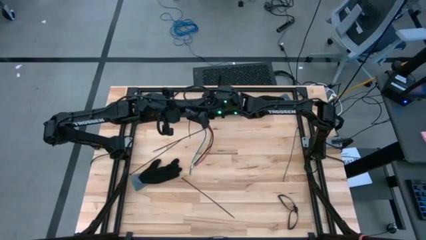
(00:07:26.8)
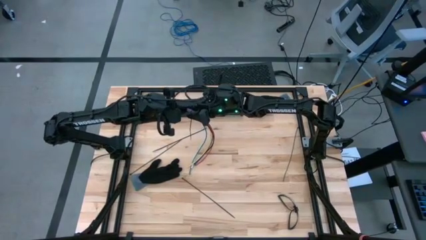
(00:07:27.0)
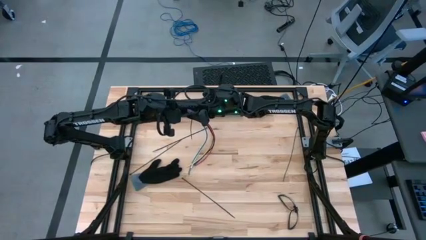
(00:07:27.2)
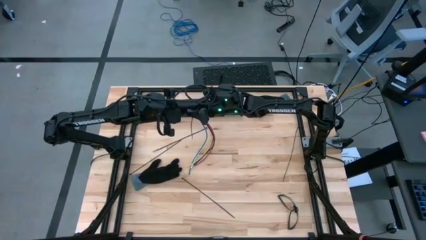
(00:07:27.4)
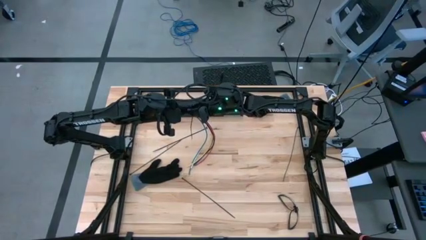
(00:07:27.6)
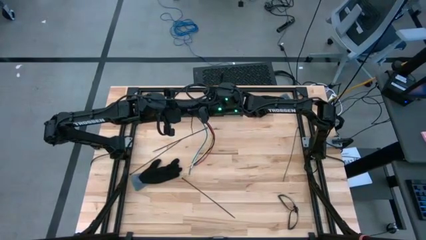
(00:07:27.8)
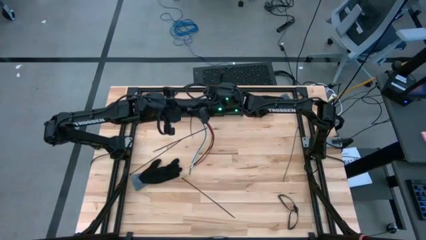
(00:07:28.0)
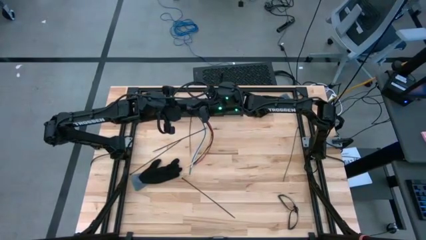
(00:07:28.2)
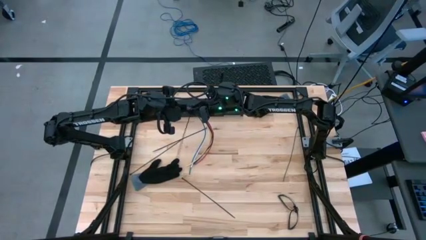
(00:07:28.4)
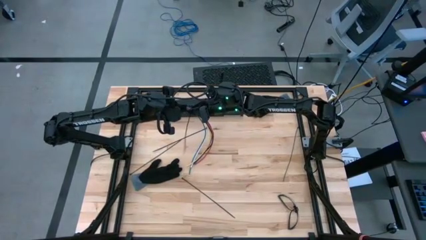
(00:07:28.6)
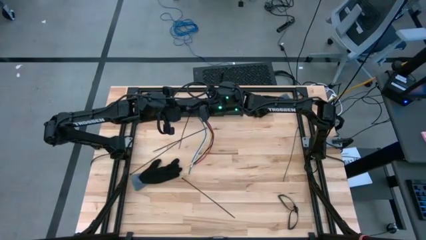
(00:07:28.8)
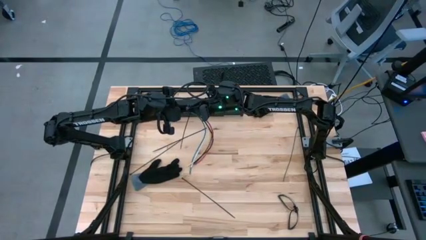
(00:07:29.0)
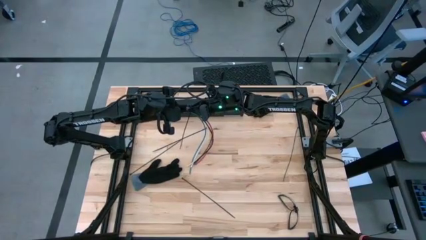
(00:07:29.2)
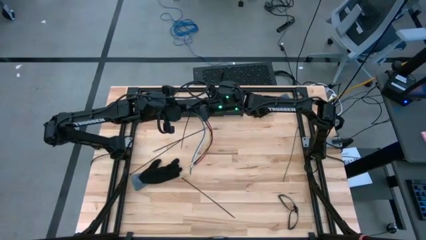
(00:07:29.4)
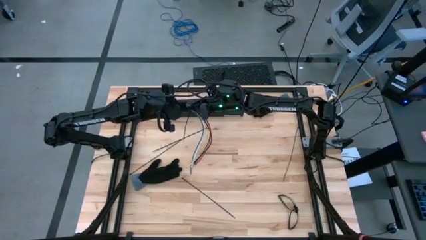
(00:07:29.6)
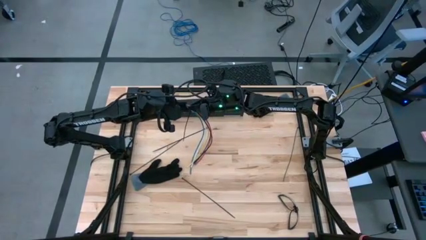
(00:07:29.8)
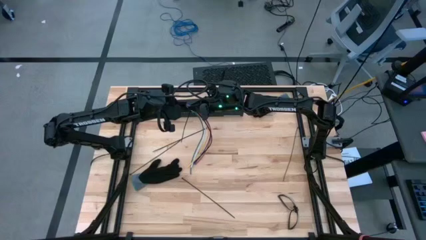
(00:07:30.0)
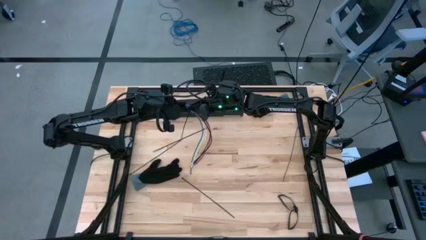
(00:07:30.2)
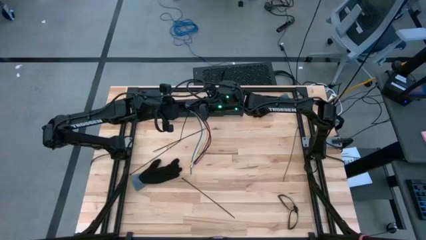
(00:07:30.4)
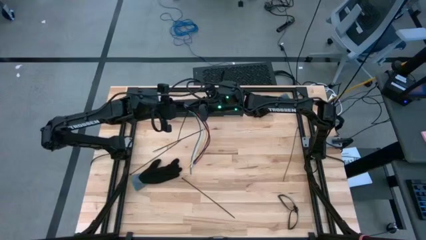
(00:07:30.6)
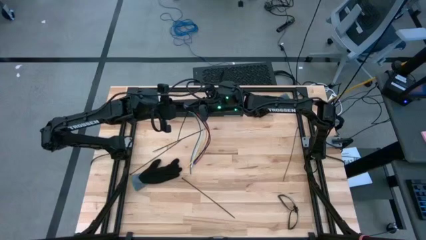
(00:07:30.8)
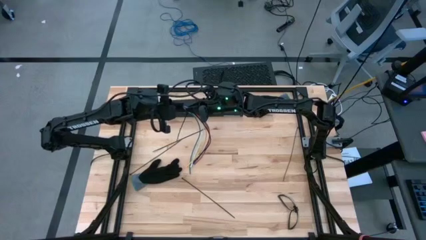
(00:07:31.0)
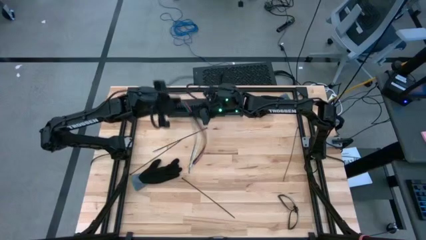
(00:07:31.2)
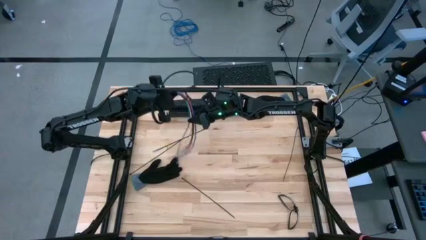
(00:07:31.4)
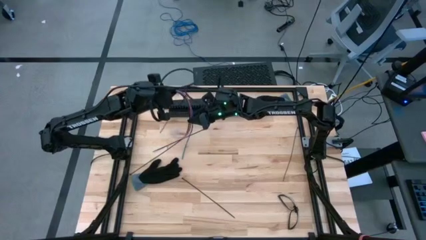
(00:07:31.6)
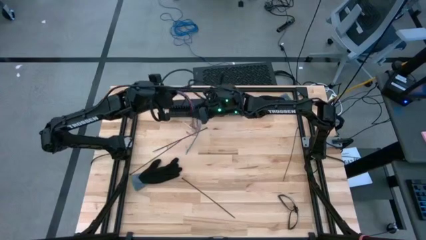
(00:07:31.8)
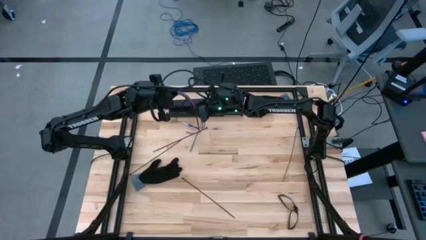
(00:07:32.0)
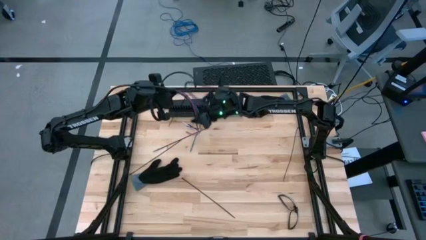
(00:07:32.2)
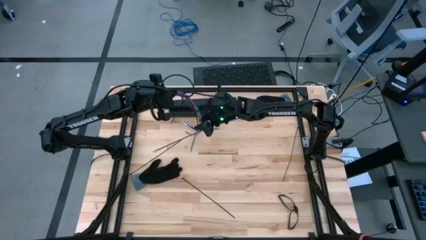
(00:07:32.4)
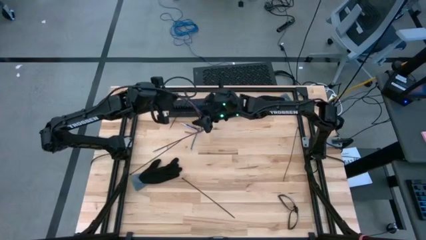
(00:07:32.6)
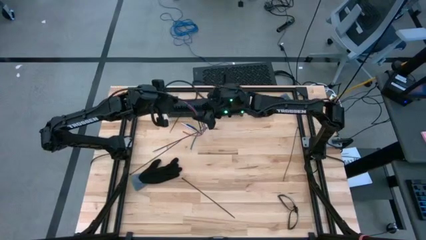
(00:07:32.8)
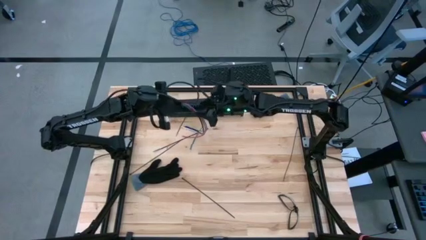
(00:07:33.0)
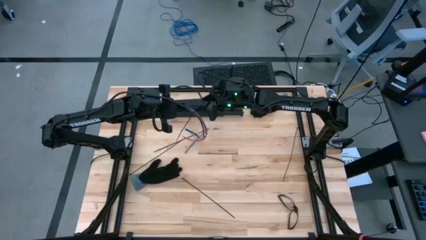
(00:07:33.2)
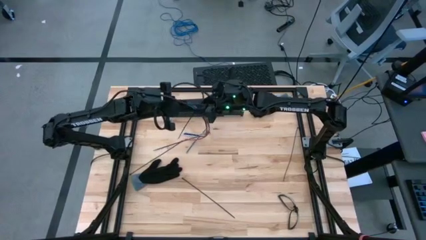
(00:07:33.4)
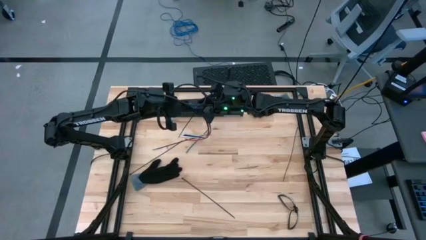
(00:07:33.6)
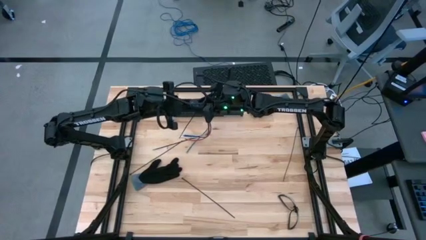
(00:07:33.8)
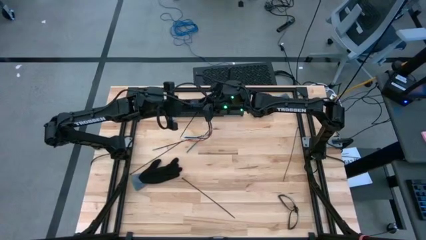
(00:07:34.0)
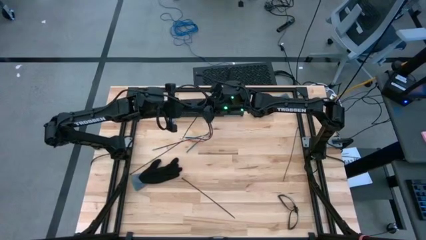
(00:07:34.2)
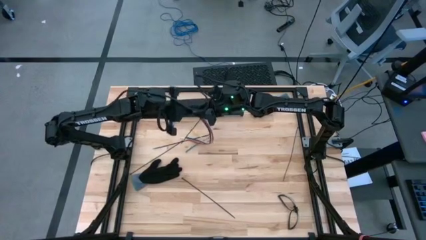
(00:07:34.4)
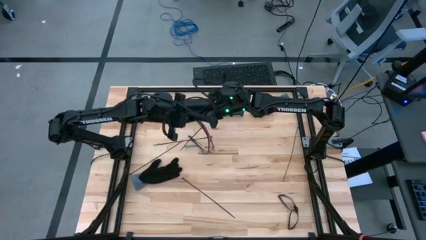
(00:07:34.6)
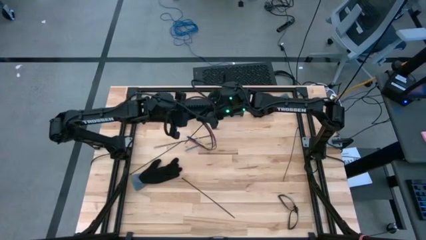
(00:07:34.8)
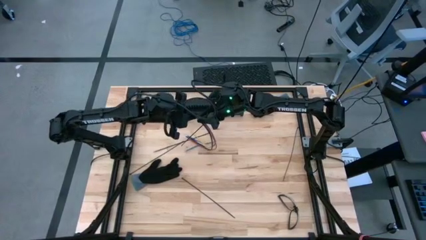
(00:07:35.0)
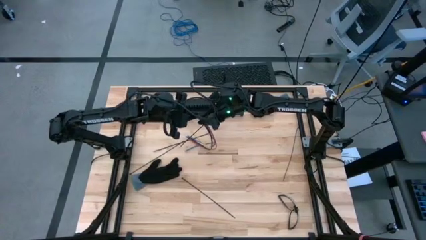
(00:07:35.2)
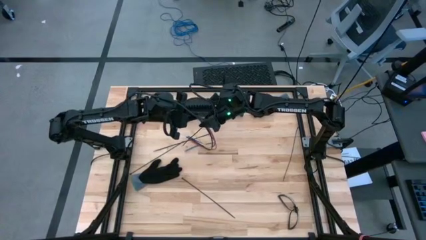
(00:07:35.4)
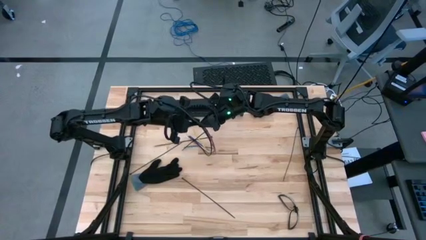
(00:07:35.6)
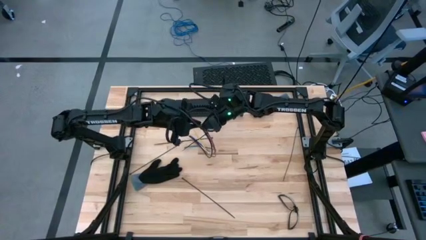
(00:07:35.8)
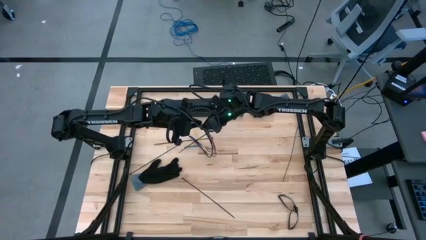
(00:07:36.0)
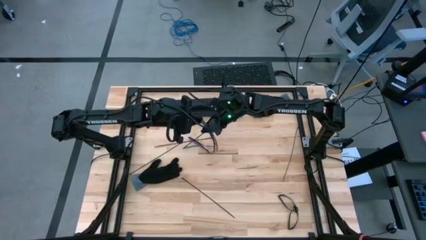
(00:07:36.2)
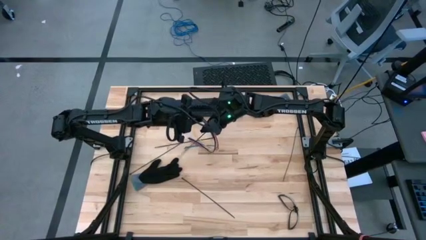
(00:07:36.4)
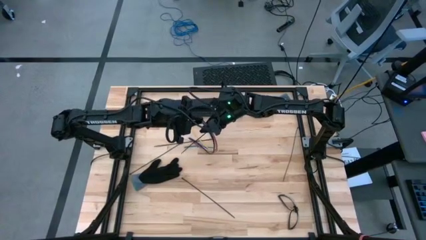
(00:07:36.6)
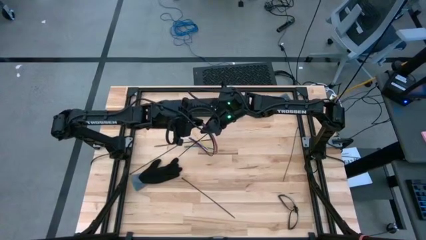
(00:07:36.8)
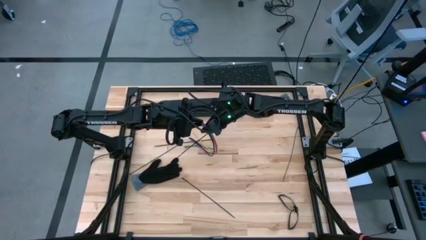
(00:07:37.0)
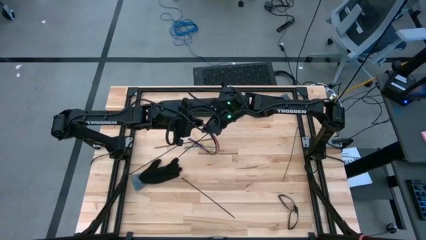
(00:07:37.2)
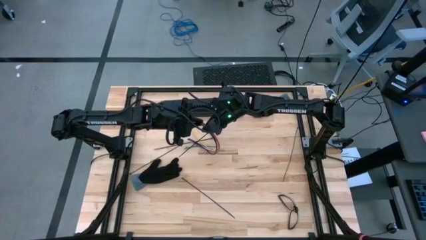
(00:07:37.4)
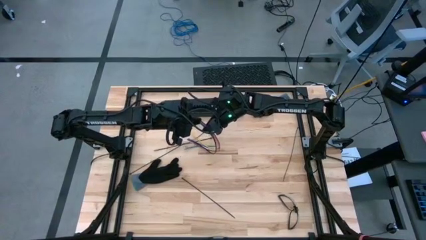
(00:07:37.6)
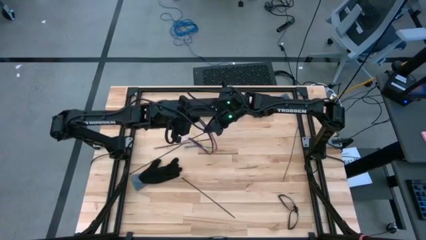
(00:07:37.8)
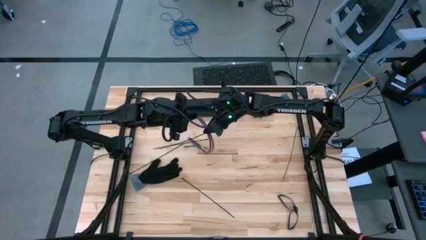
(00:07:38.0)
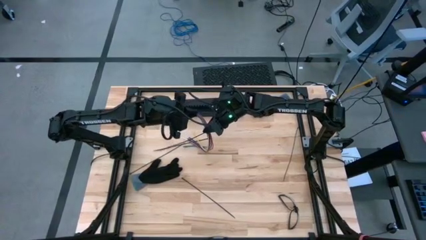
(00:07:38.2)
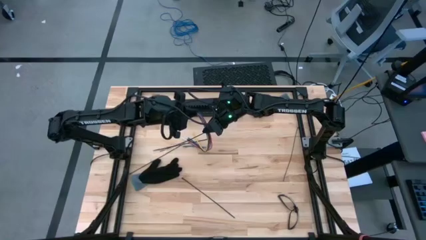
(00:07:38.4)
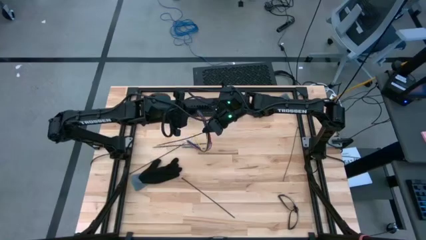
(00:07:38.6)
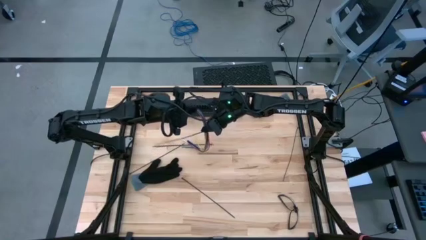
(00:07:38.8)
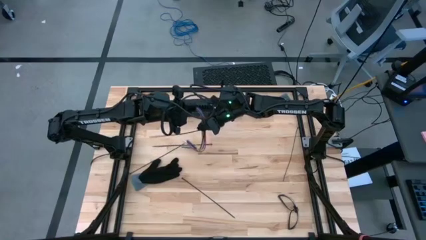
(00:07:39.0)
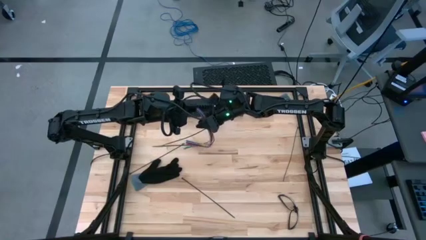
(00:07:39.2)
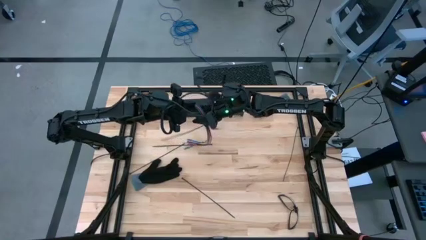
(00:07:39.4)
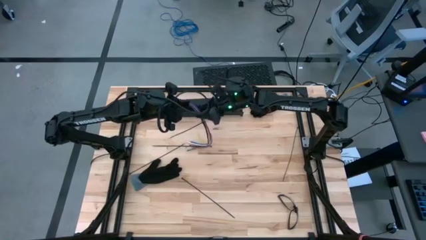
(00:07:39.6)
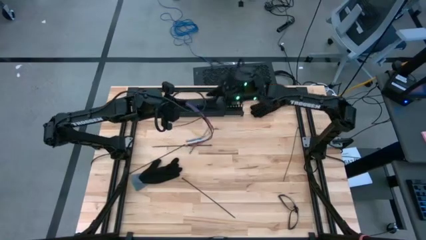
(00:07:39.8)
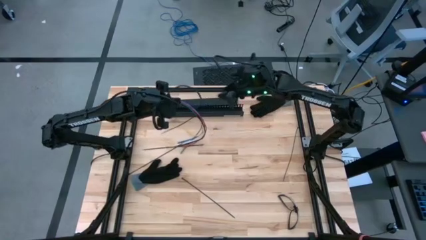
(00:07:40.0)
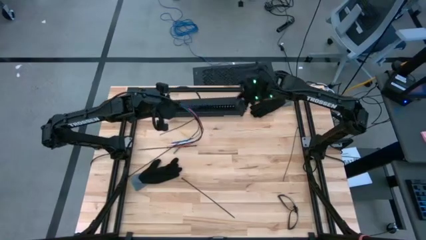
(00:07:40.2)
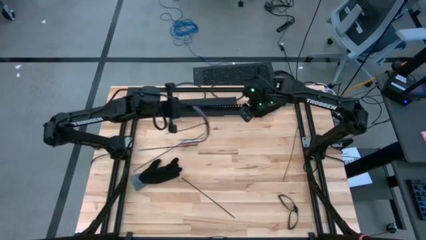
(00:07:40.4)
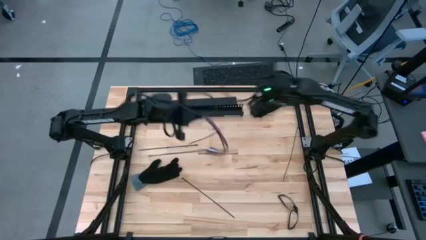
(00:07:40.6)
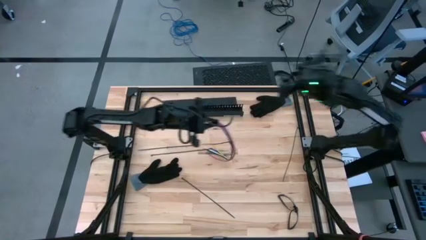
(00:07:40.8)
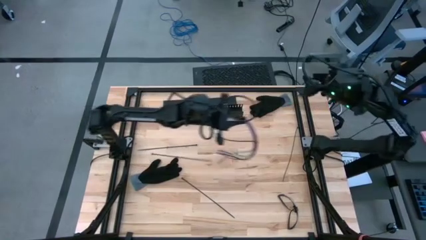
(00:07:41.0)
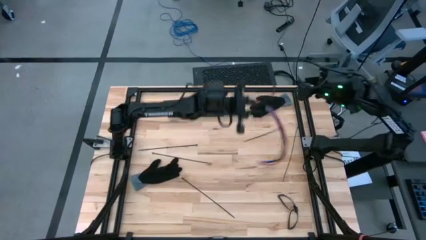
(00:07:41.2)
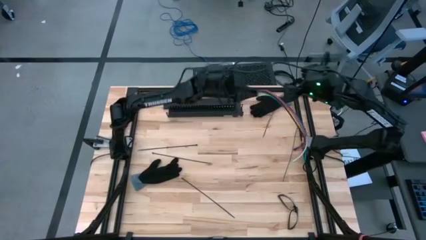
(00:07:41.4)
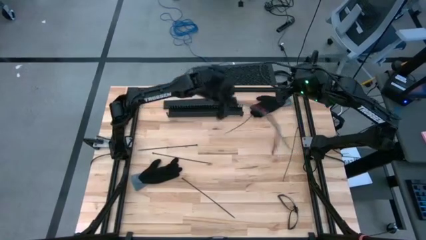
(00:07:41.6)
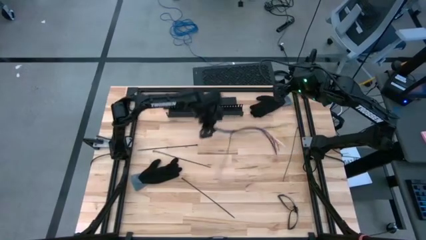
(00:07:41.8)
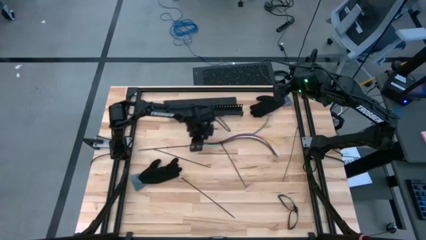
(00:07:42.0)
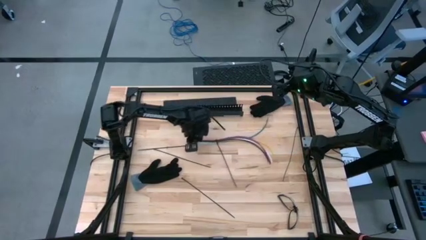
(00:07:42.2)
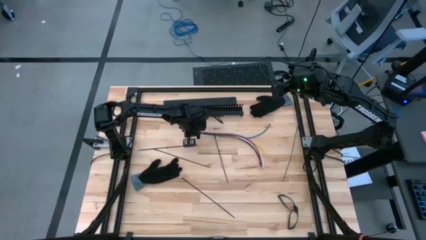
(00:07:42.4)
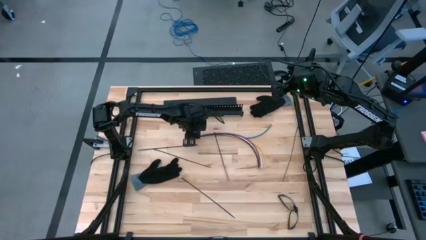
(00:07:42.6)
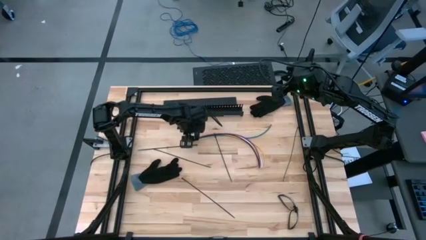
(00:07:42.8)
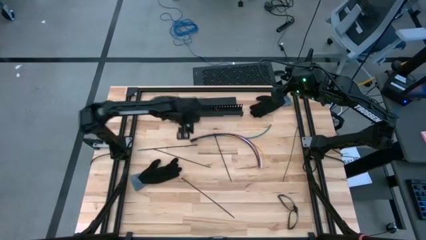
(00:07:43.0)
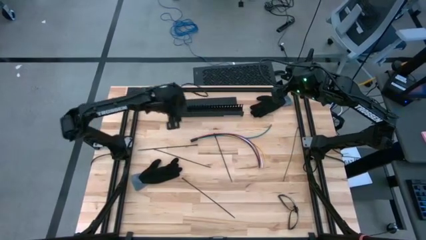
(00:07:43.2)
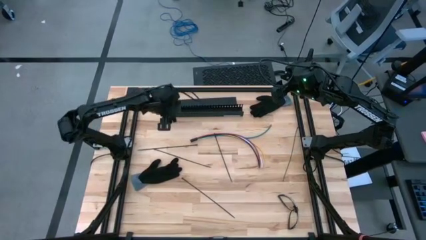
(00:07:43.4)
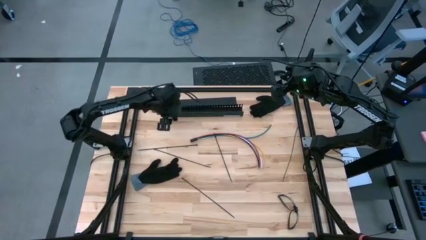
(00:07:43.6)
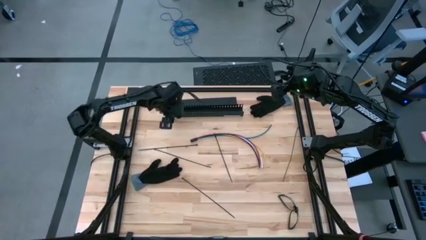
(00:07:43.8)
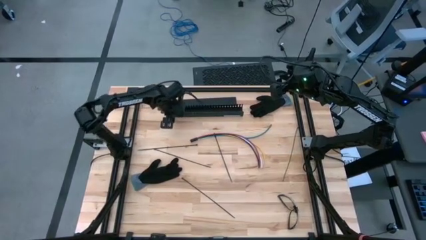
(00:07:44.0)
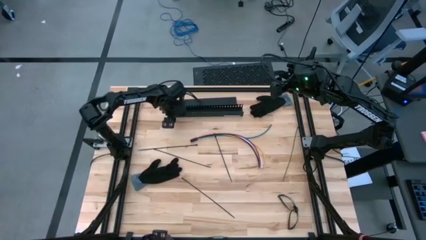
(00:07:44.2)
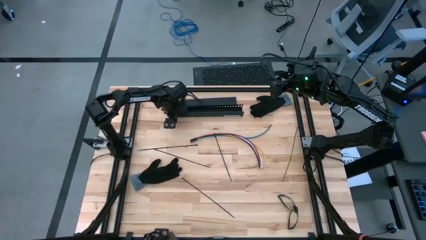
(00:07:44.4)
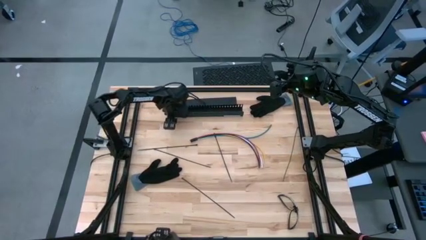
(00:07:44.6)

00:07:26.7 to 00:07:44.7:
Task: Ziptie cables
Put the zip tied cabled wires into the cable duct
